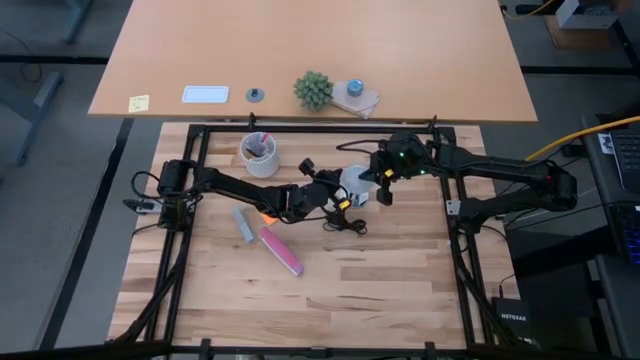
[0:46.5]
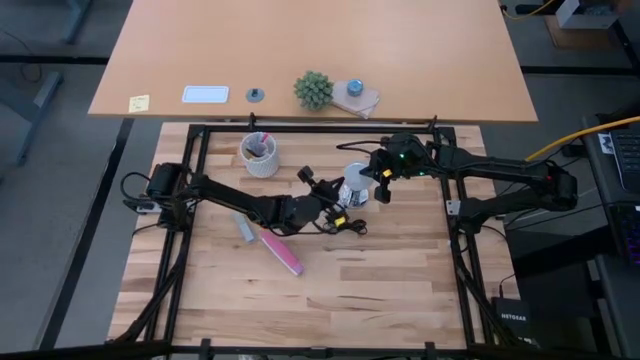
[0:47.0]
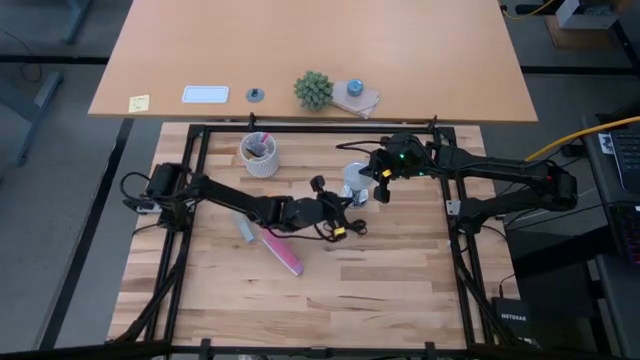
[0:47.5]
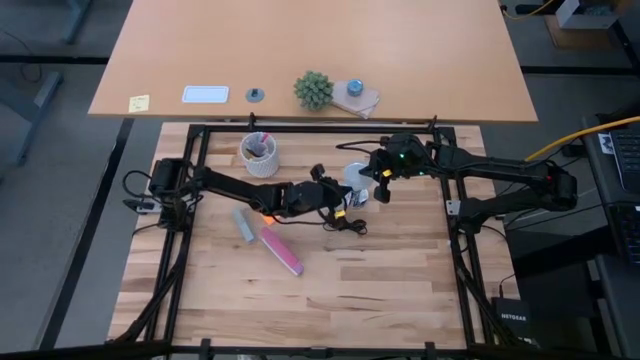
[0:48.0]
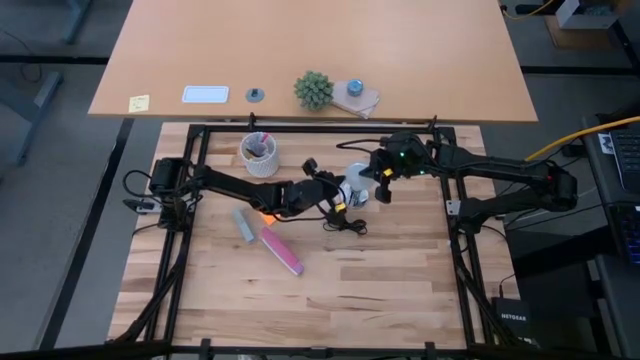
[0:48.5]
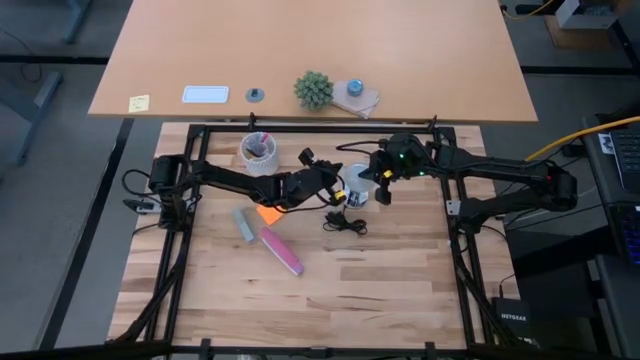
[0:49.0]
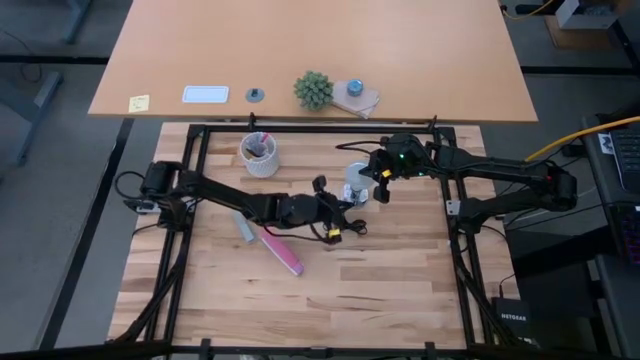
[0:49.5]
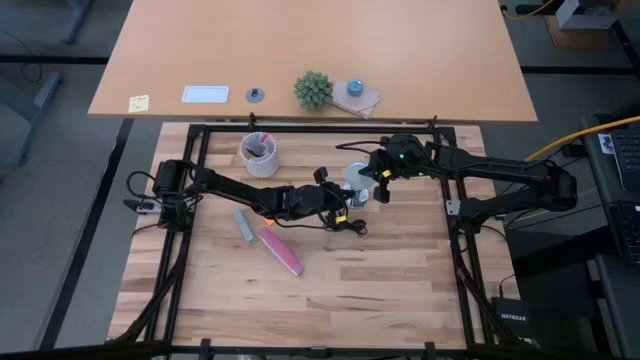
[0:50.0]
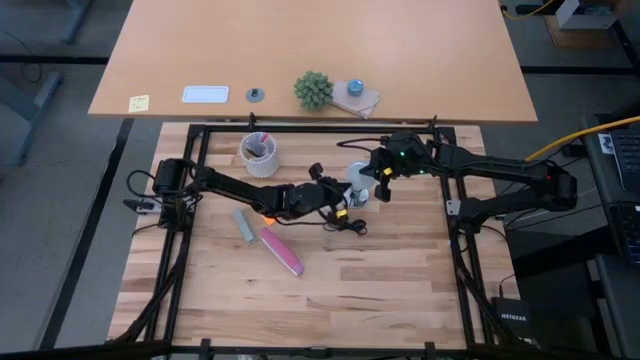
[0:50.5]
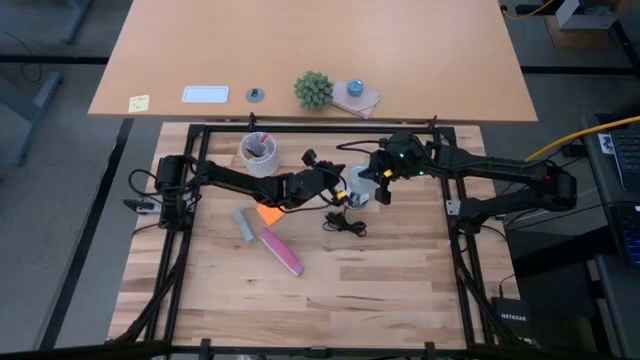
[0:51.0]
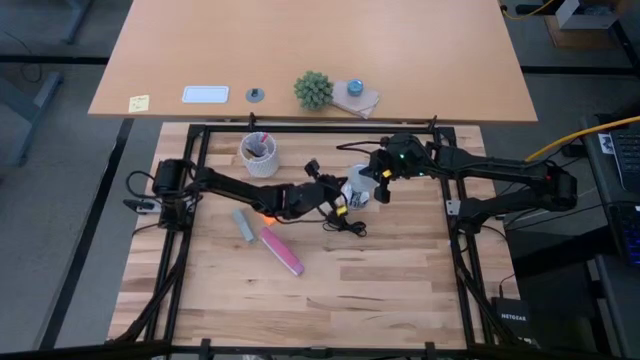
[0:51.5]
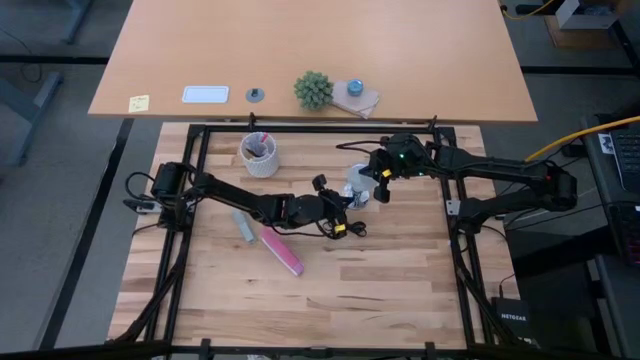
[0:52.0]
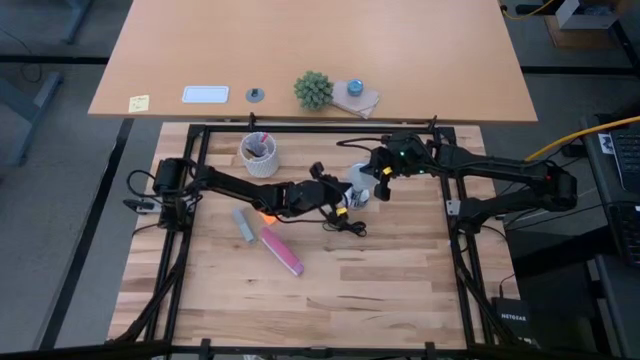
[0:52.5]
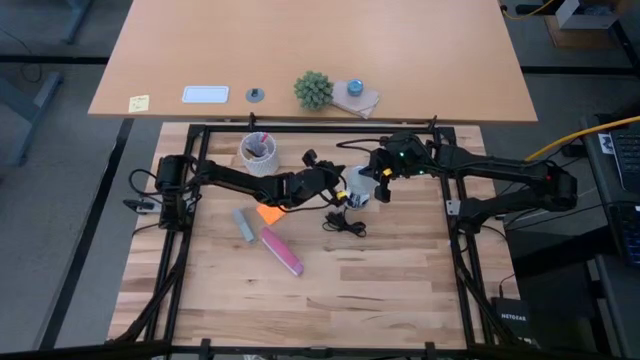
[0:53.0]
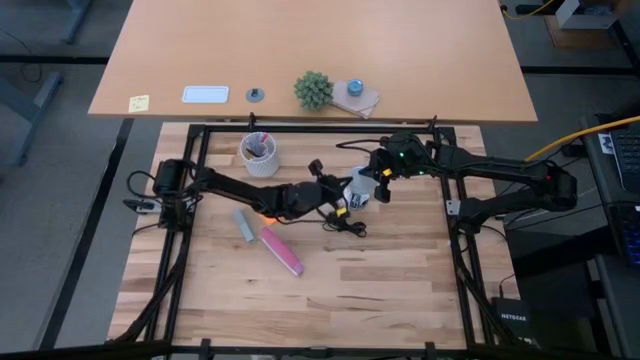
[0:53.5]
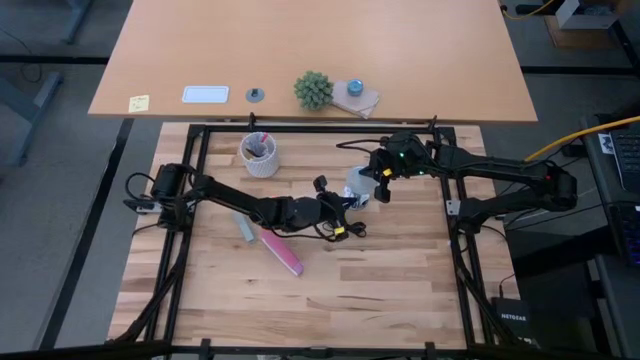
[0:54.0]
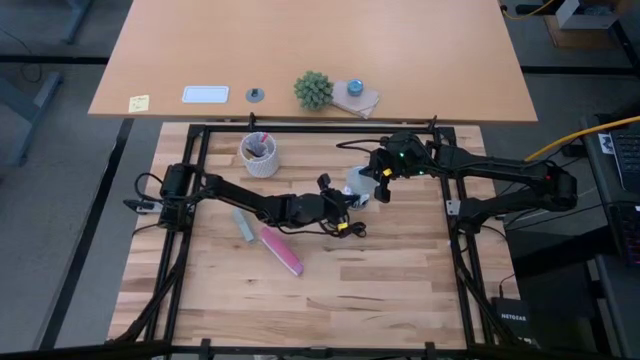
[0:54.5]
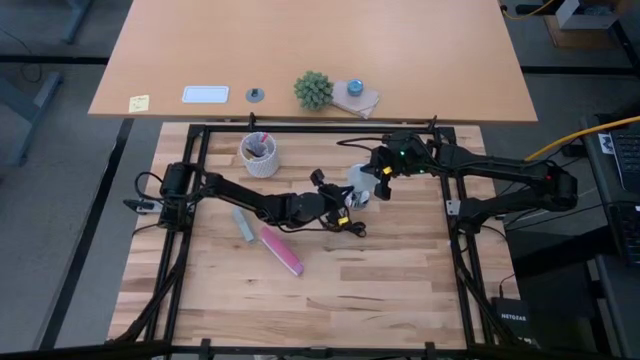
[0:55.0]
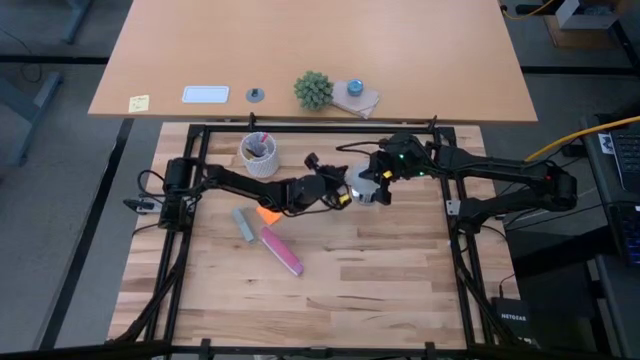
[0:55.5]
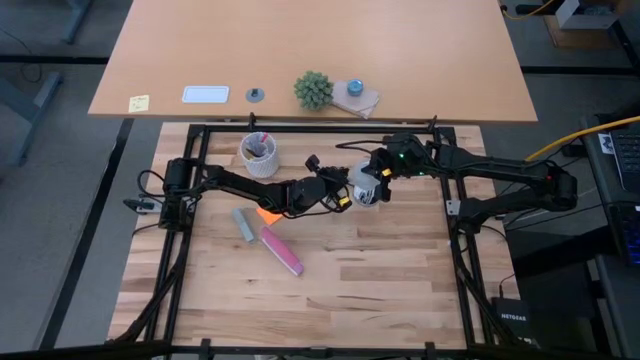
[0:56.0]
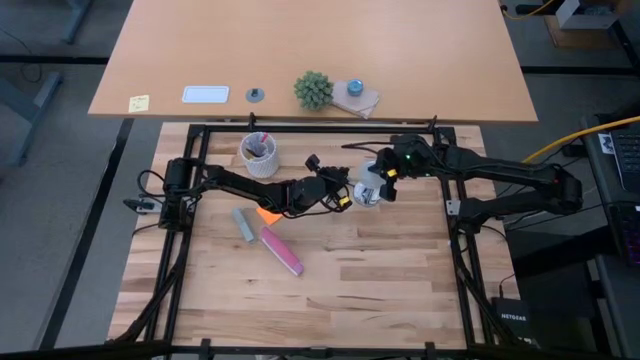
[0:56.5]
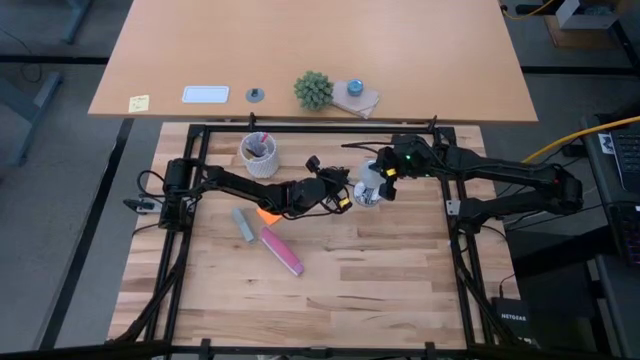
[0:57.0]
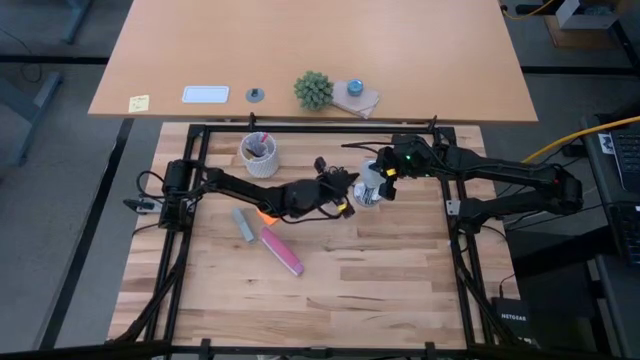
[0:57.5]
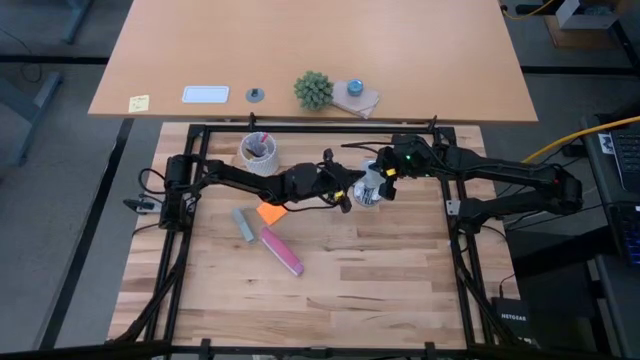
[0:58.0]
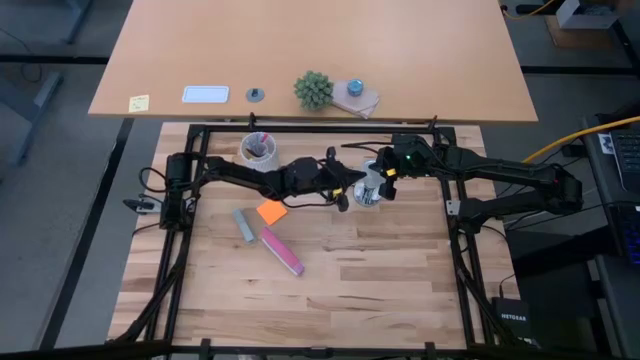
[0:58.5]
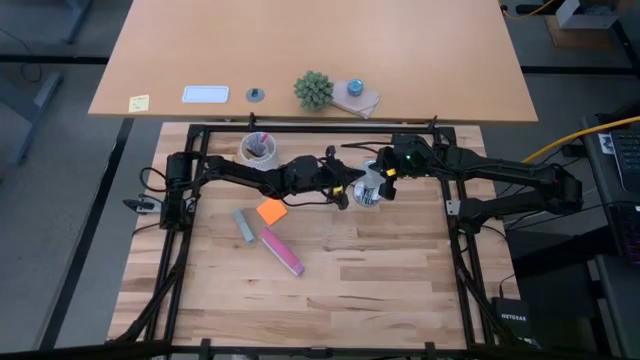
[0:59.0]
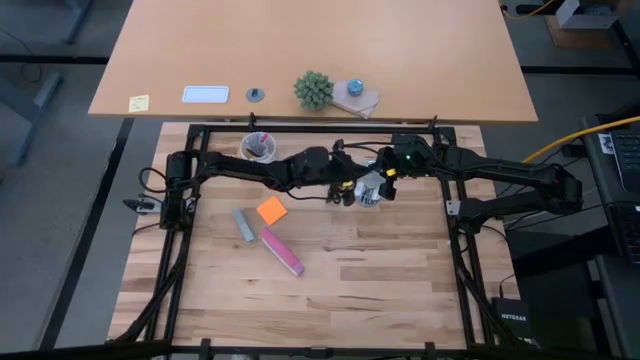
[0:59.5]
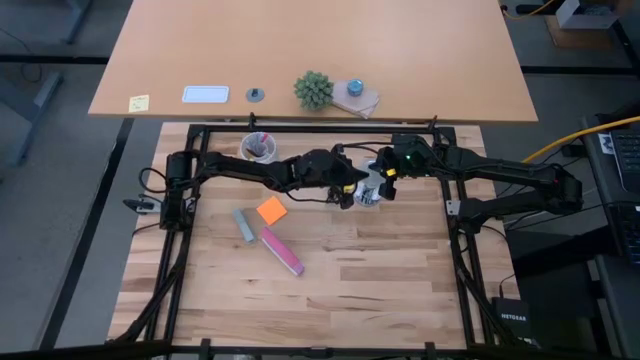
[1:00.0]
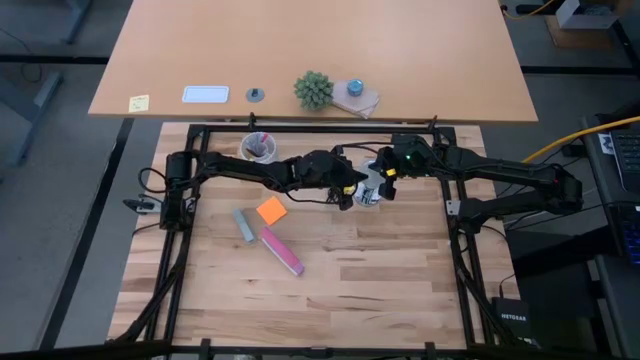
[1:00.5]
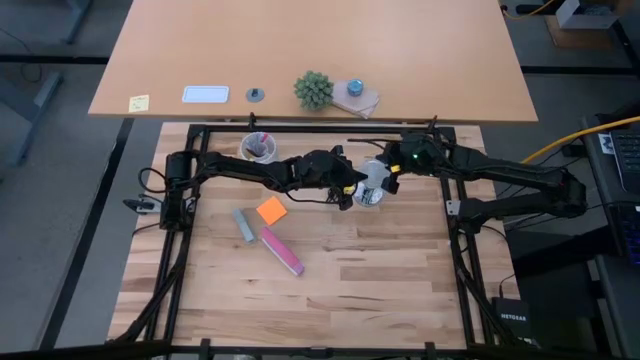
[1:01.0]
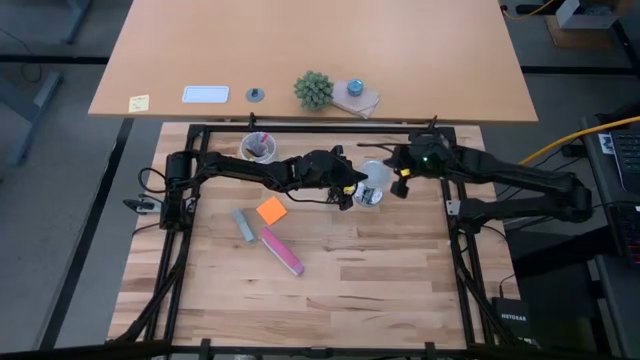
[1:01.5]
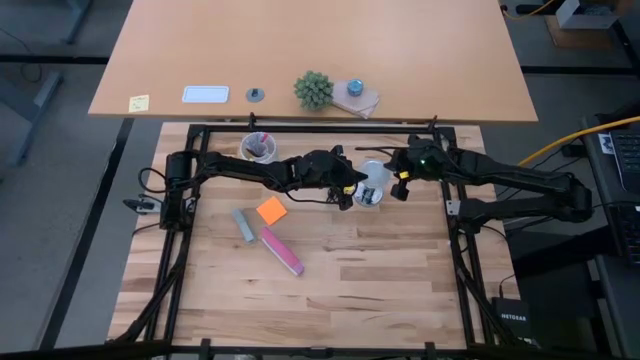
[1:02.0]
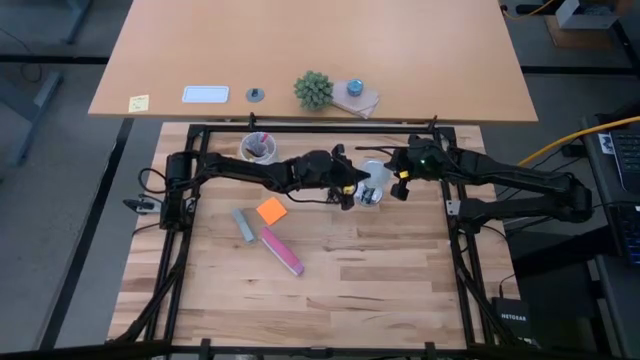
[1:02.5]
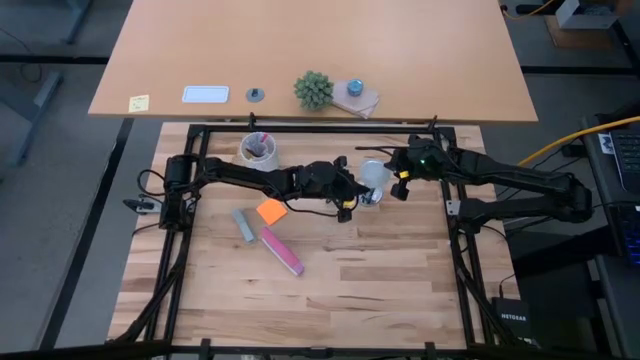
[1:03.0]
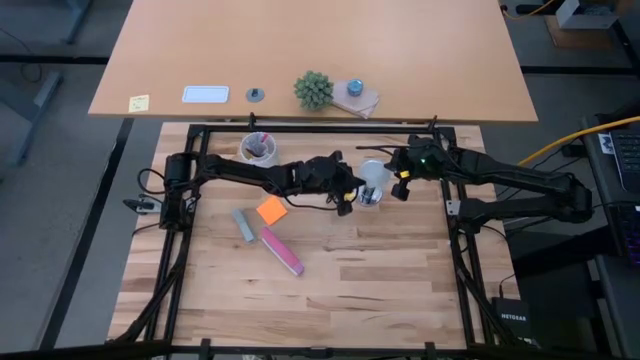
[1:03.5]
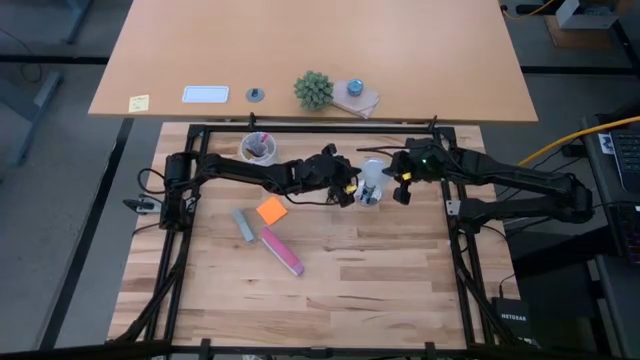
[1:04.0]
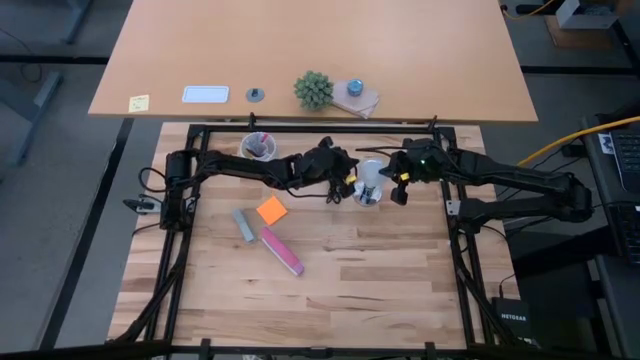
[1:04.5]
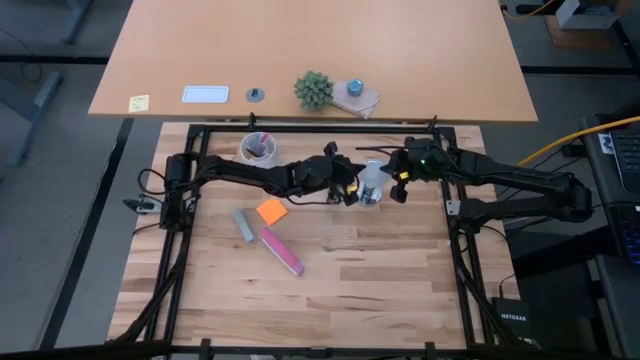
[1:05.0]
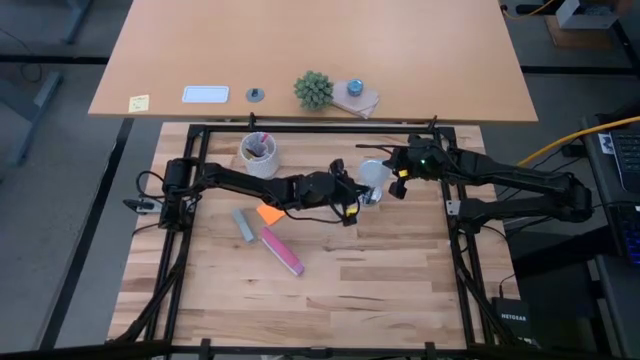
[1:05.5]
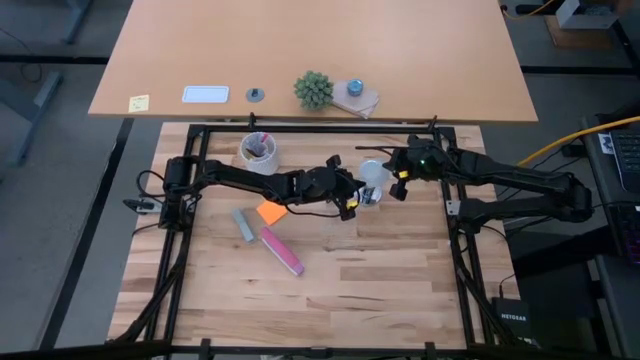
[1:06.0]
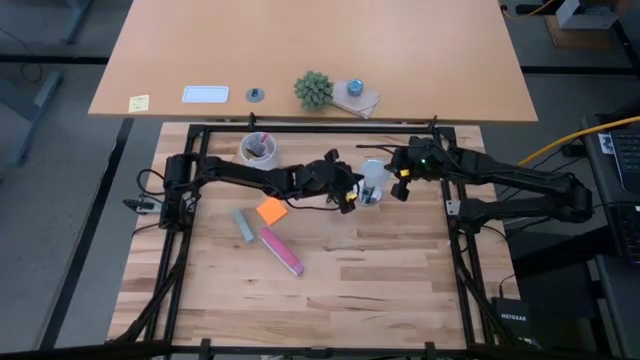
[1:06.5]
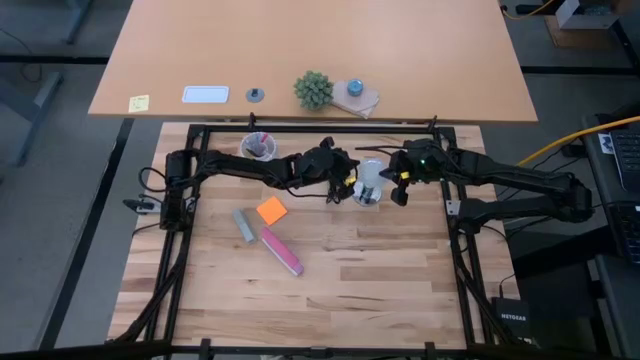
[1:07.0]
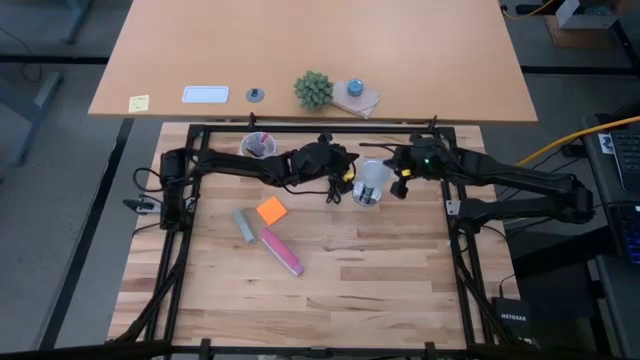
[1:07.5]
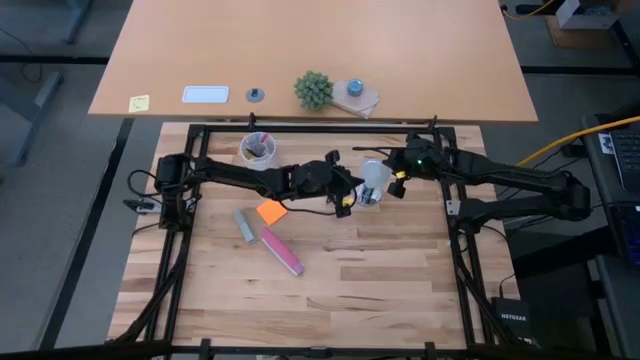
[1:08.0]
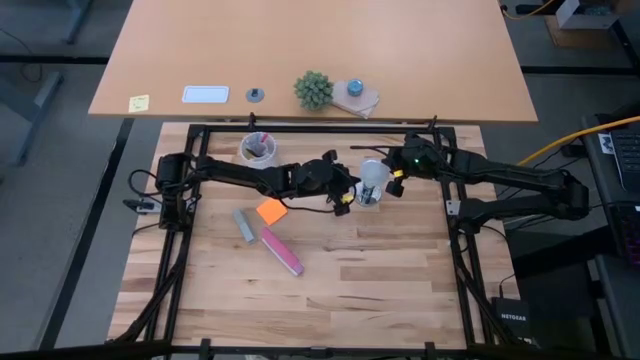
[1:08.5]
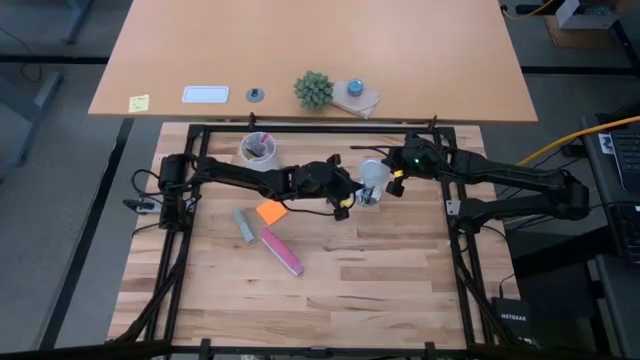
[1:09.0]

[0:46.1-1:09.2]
Task: Screw lightbulb
Insert the lightbulb into the lamp
